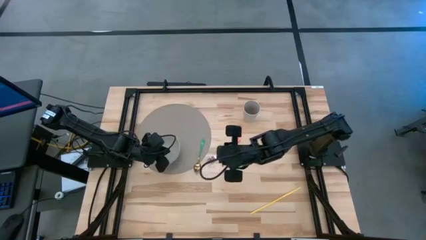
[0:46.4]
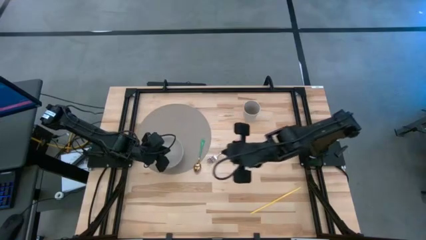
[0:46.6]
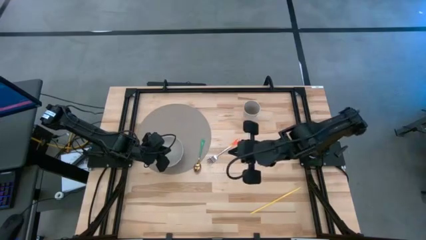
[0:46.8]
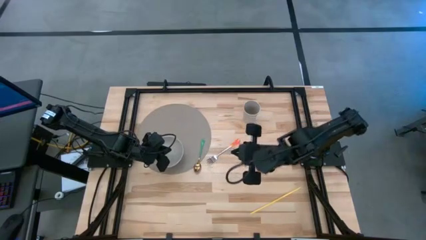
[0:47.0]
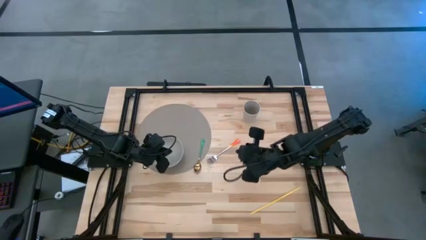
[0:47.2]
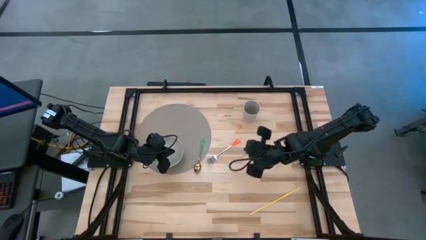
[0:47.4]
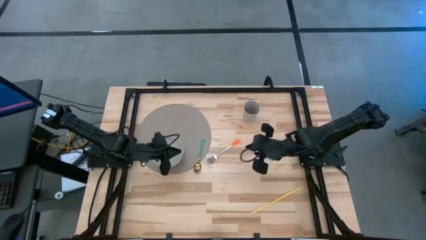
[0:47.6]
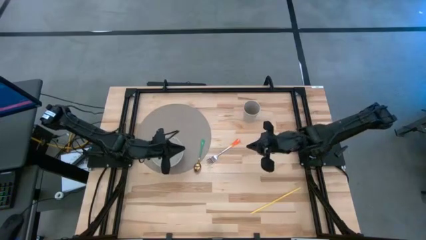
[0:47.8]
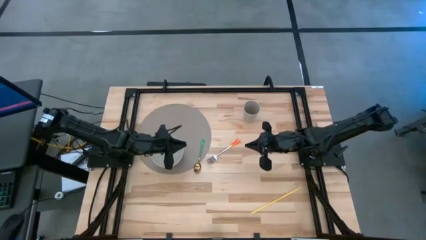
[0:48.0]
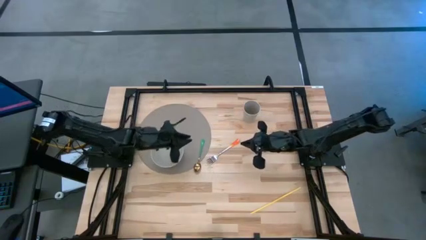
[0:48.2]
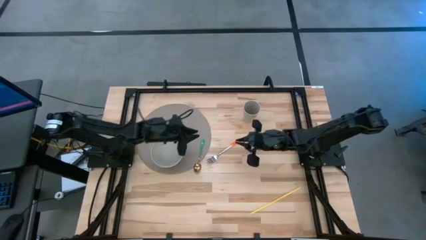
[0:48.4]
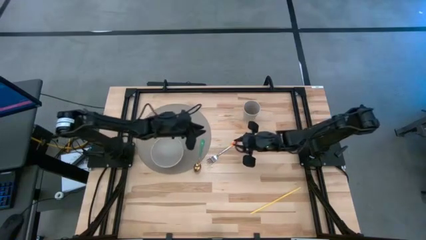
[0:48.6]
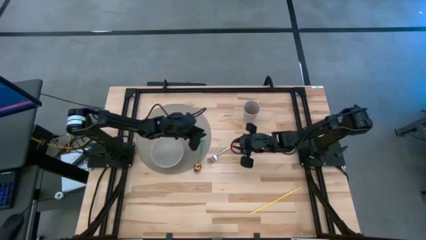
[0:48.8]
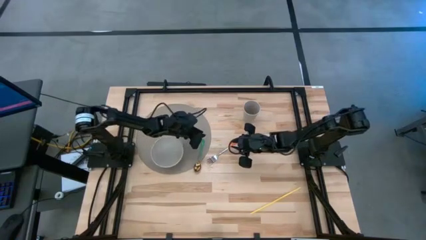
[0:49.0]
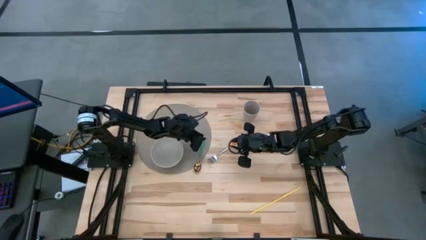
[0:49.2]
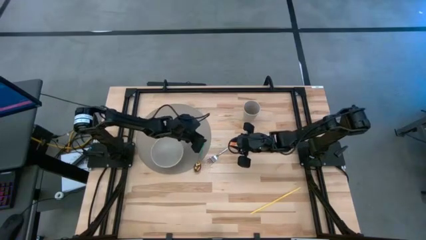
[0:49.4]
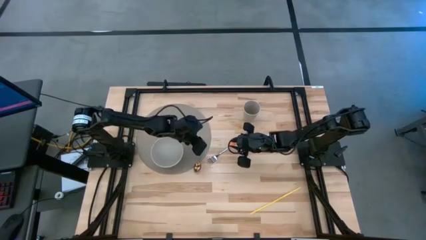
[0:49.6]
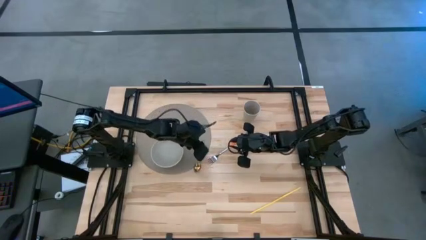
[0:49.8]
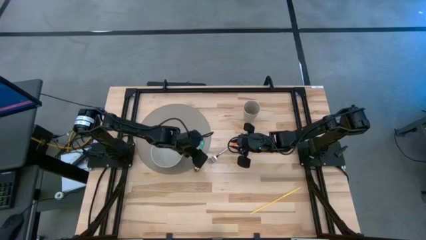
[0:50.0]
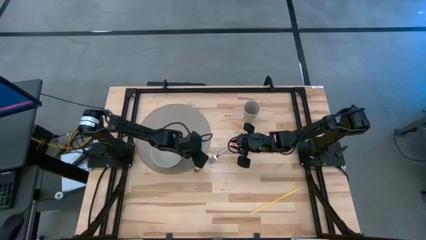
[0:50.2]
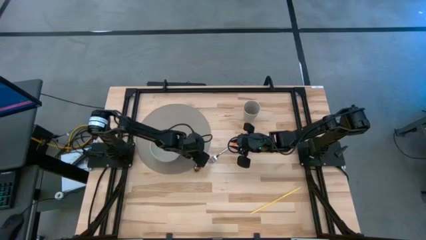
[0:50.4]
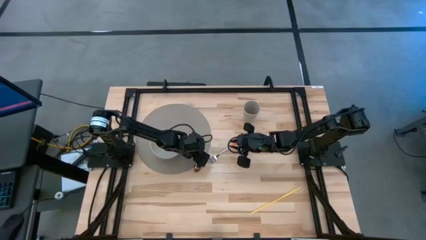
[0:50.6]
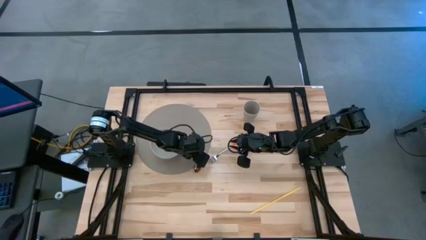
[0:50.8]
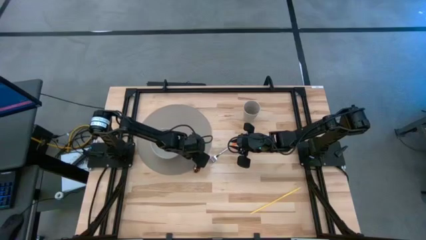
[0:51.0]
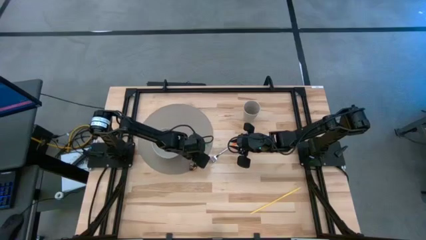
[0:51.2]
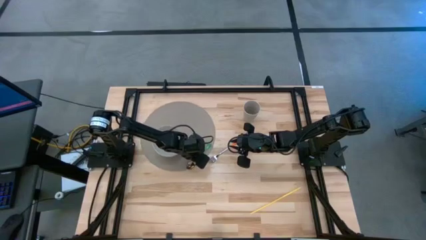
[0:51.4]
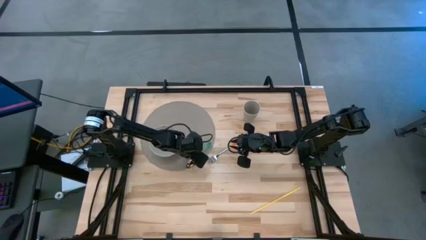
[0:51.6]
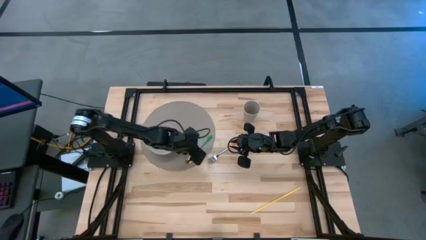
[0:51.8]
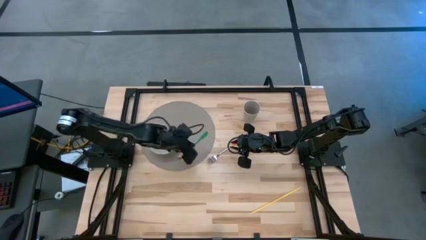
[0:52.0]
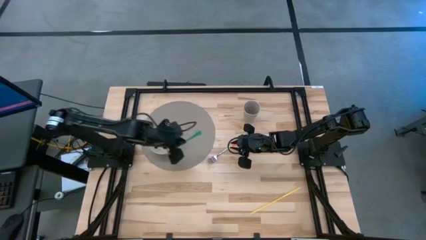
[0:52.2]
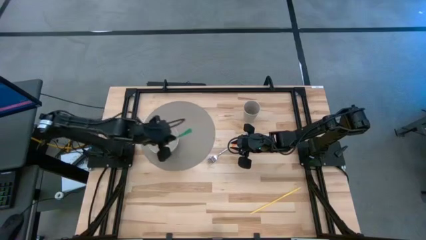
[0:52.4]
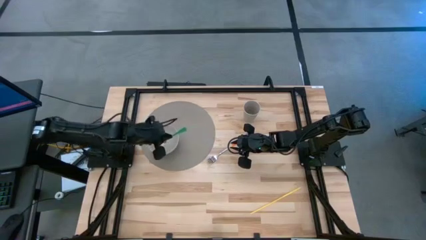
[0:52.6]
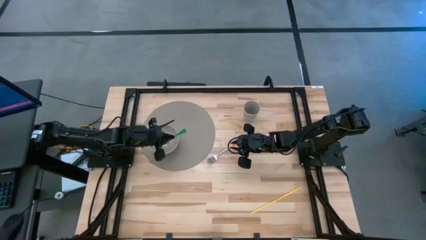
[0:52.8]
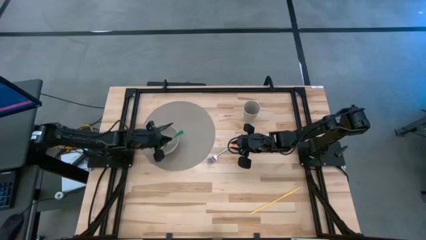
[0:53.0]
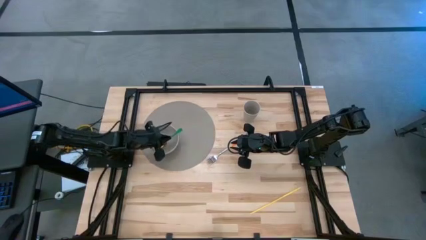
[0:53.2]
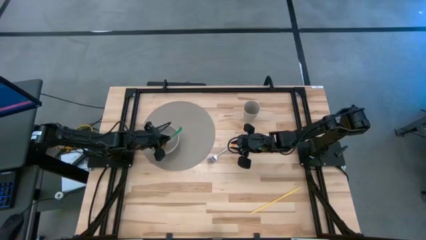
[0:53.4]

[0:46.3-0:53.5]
Task: Pick & Place Utensil
Put the green spoon into the bowl

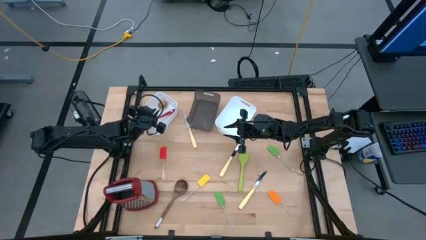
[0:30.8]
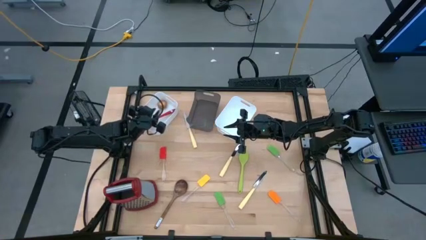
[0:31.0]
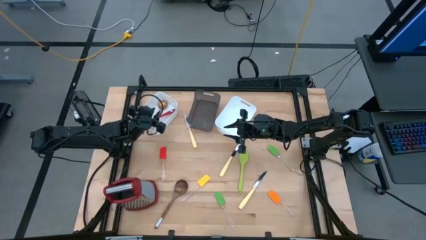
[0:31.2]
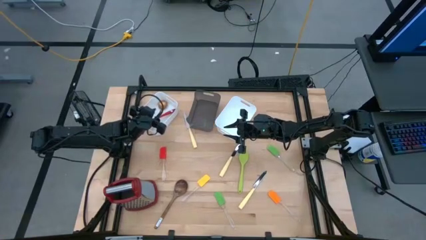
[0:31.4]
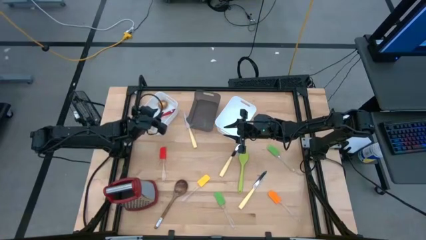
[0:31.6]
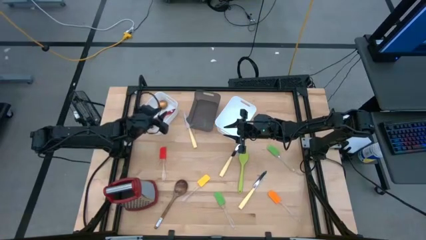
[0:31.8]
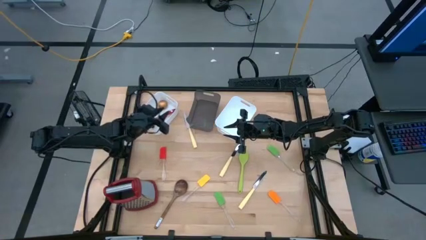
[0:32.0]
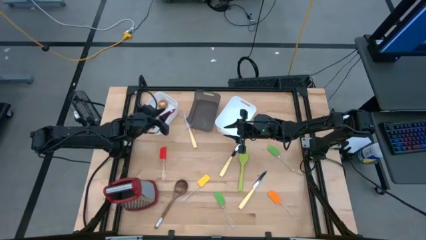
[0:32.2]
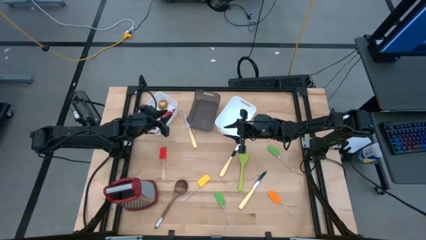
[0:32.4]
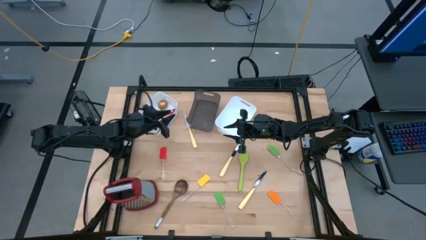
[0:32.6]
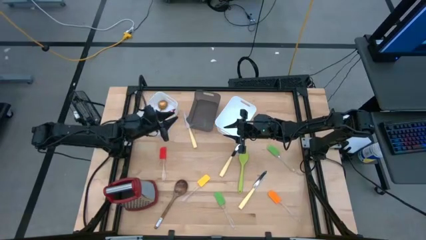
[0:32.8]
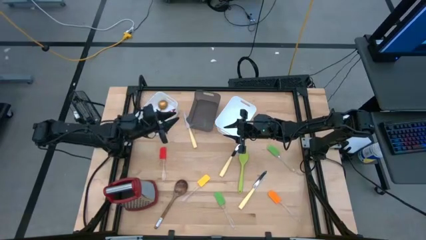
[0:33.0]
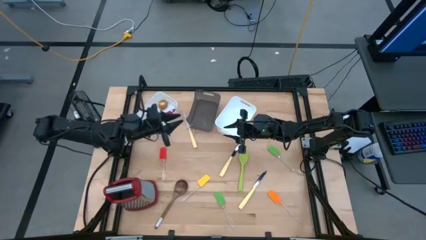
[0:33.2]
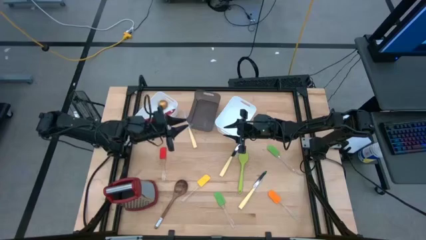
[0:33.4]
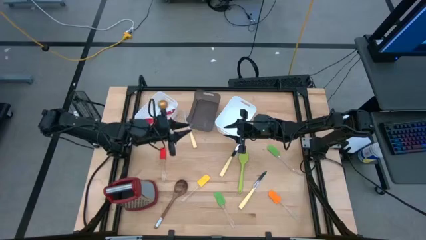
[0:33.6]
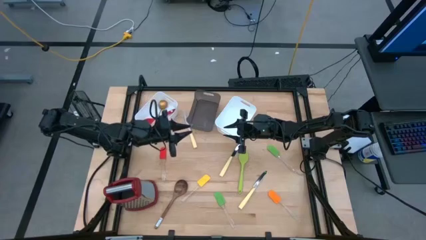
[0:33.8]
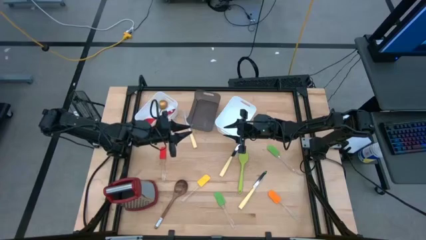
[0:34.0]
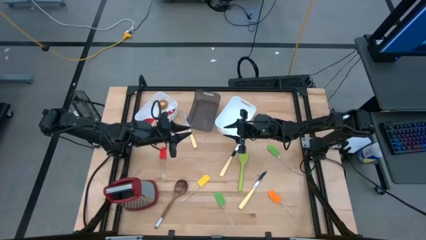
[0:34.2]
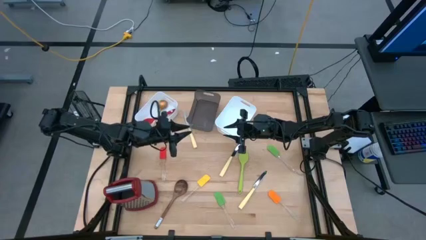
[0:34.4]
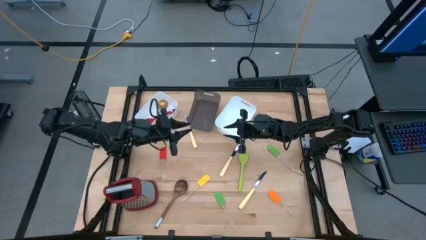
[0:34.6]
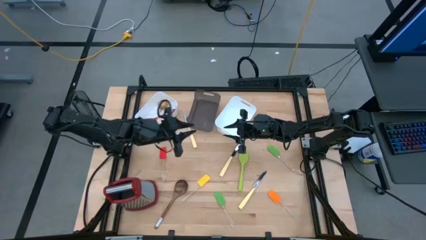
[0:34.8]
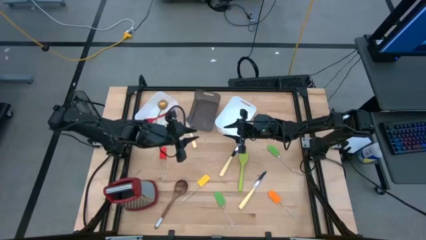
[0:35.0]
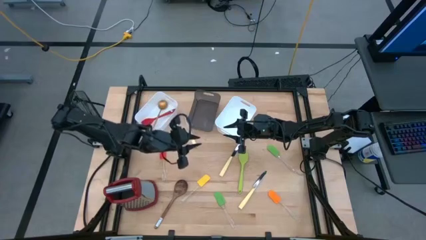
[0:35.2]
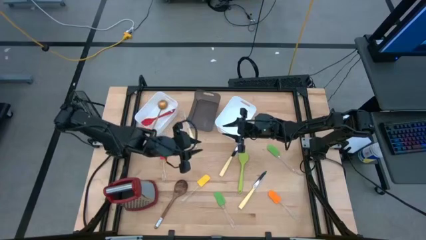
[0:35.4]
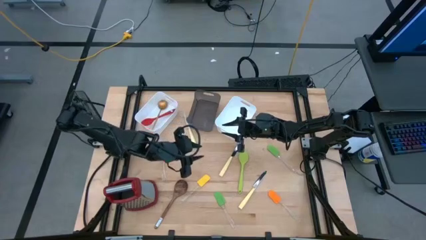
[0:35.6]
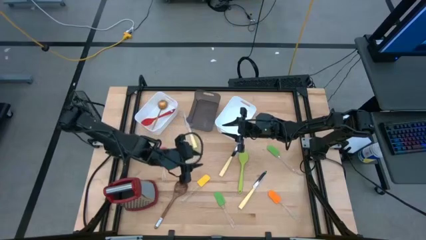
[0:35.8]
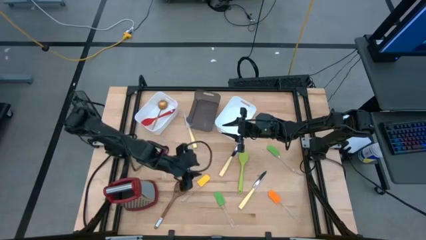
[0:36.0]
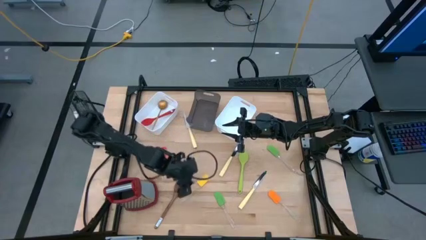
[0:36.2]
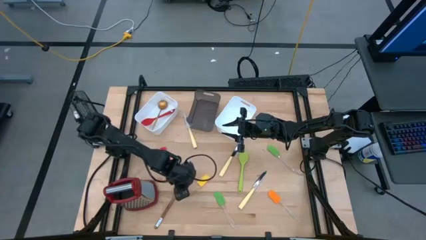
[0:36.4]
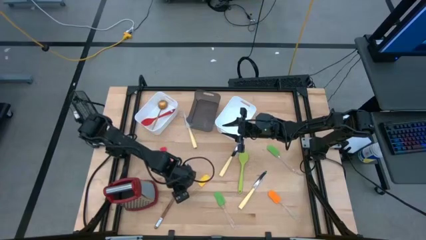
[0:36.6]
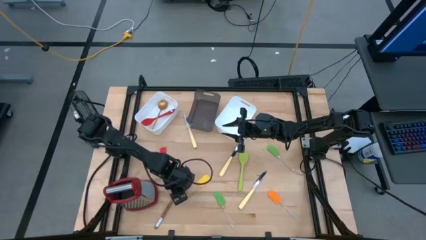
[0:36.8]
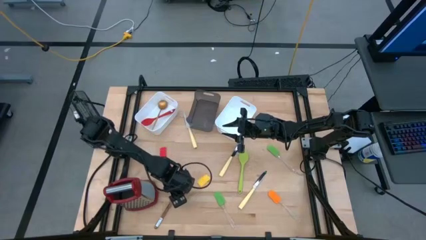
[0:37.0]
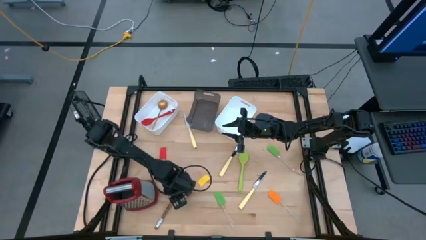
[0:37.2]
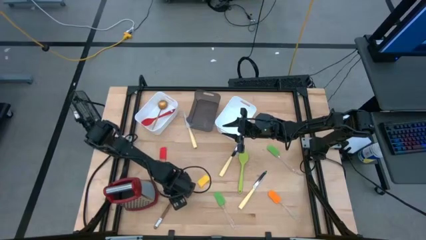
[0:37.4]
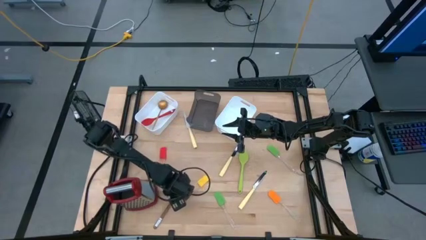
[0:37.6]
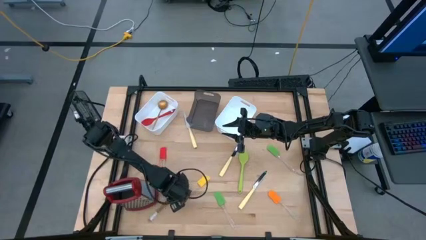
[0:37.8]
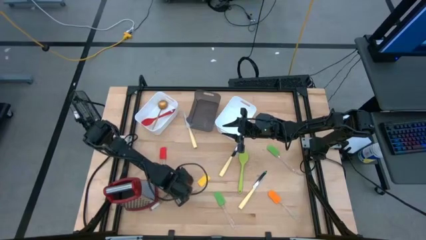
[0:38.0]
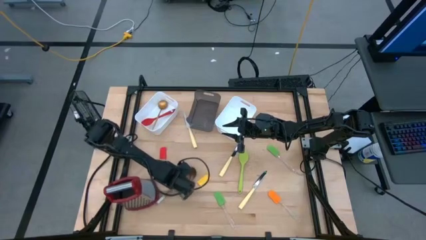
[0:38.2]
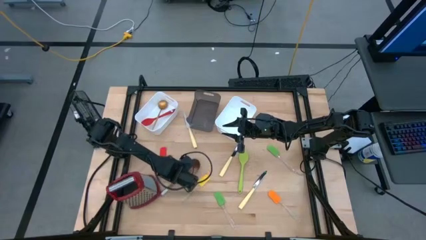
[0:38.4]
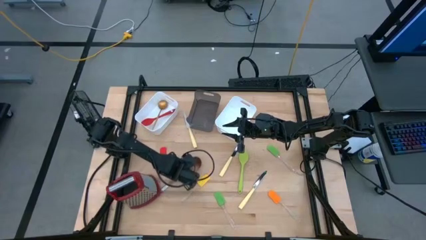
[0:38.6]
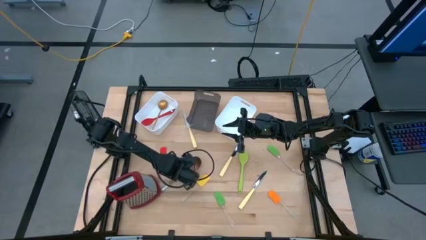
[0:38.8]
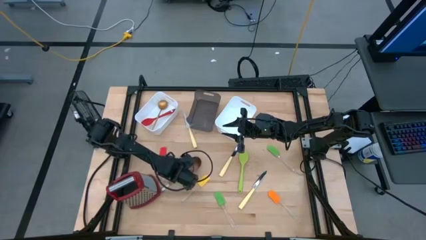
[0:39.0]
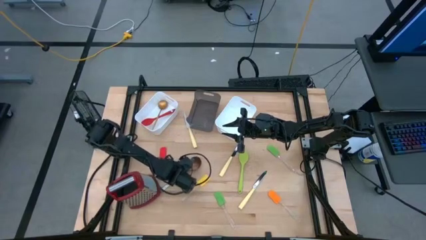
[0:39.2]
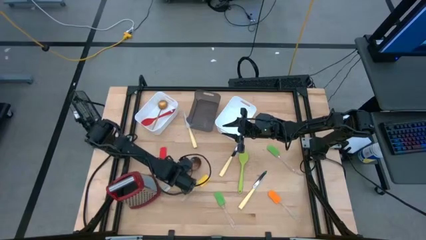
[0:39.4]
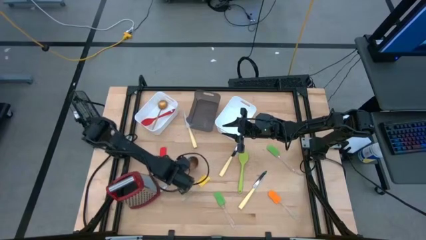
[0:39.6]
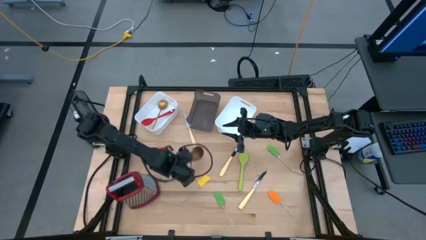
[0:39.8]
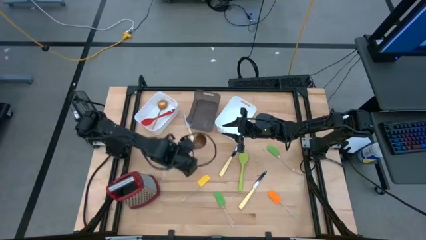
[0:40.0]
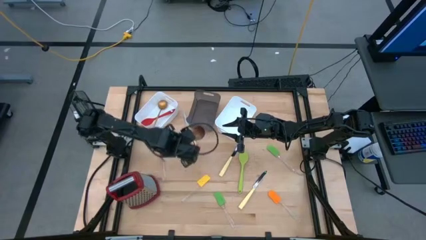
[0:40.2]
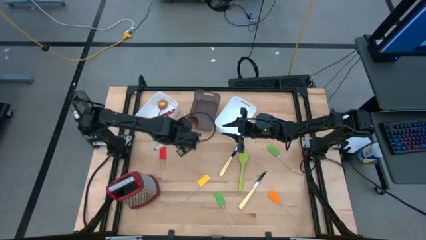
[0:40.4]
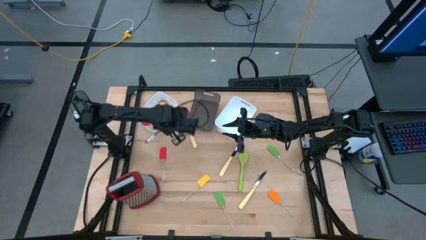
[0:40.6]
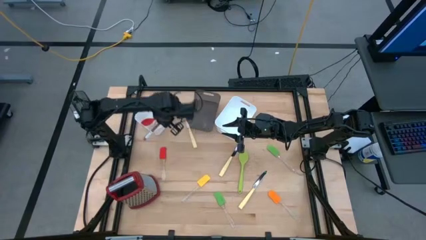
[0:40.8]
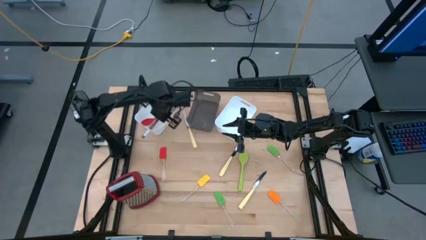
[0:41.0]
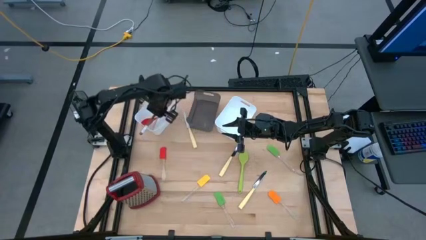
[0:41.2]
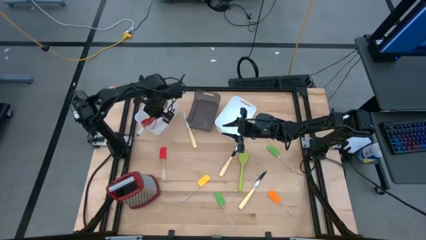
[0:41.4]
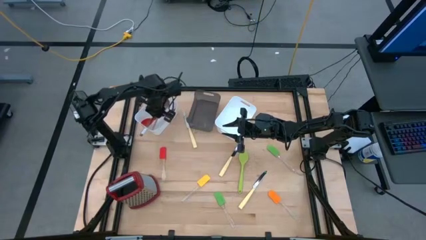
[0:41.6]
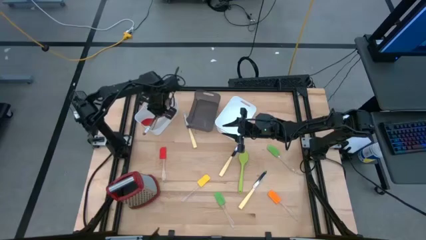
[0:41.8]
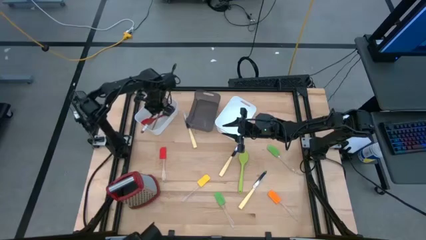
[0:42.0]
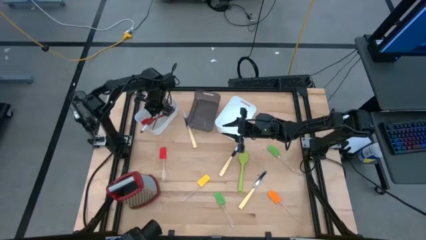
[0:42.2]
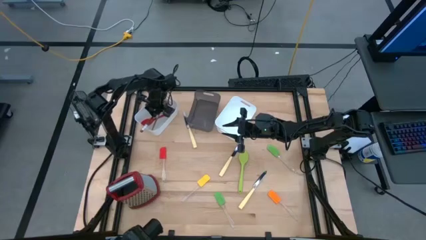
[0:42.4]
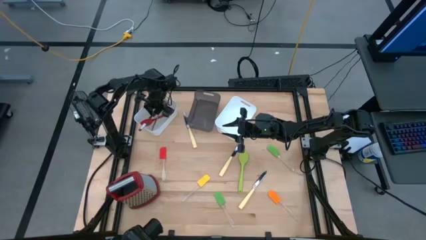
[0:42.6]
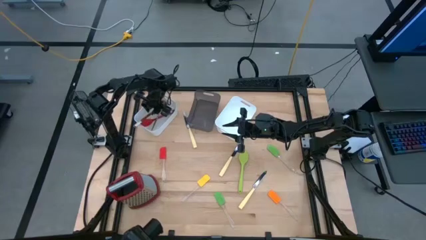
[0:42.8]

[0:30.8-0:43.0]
Task: Pick & Place Kitchen Items
Put the brown serving spoon into the left white bin
